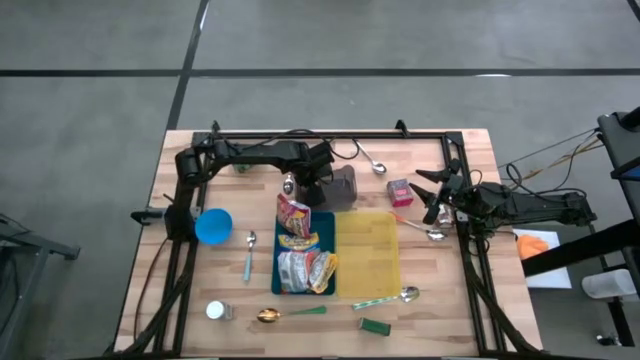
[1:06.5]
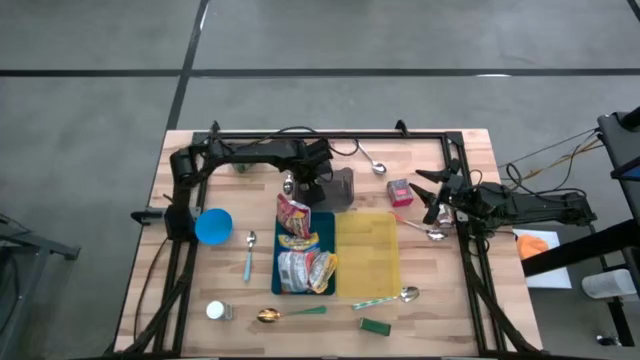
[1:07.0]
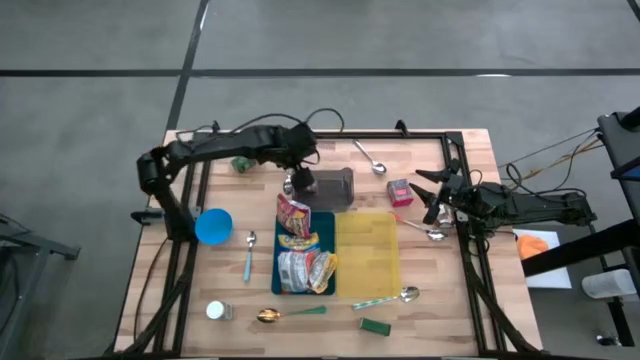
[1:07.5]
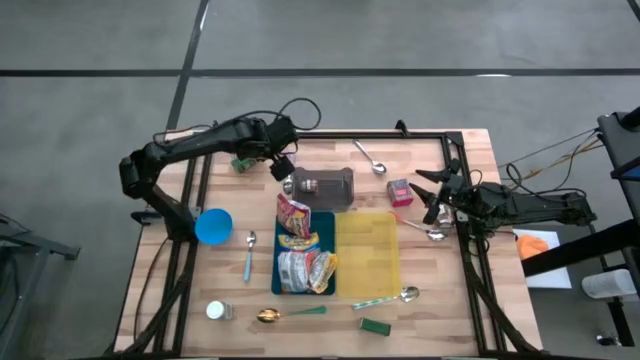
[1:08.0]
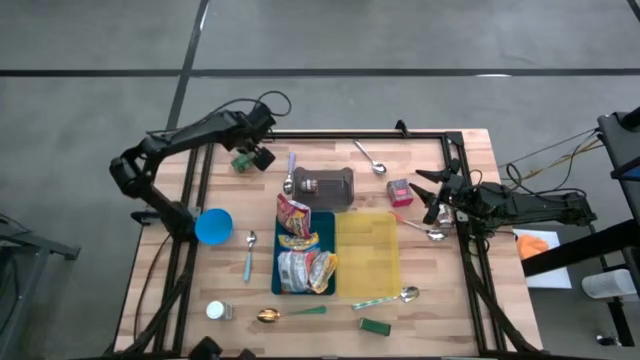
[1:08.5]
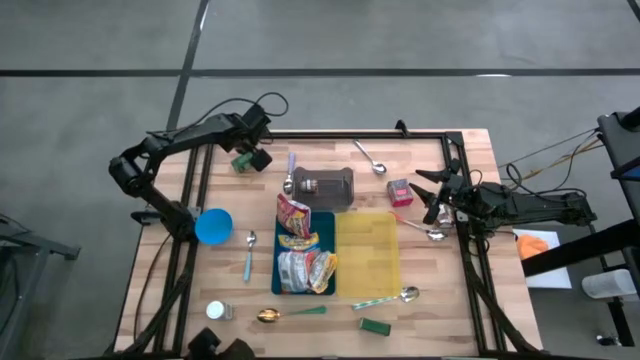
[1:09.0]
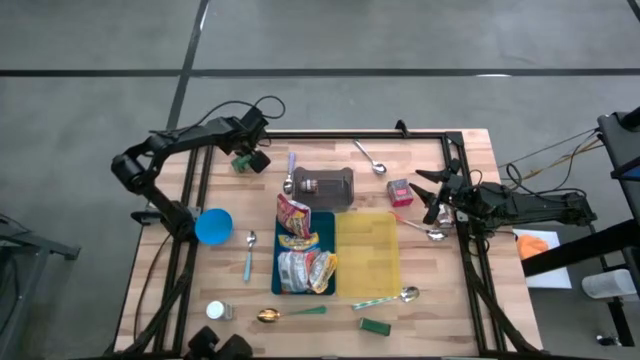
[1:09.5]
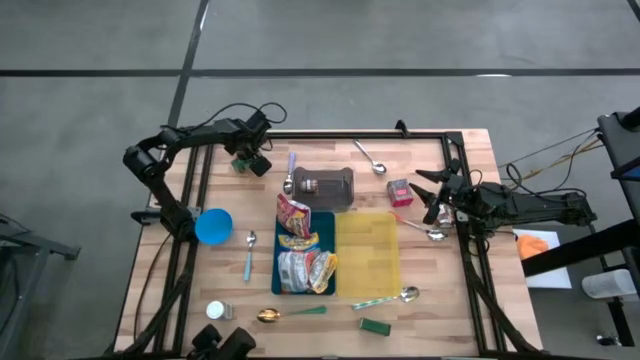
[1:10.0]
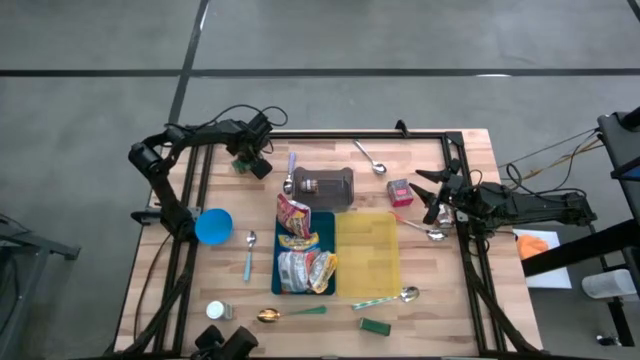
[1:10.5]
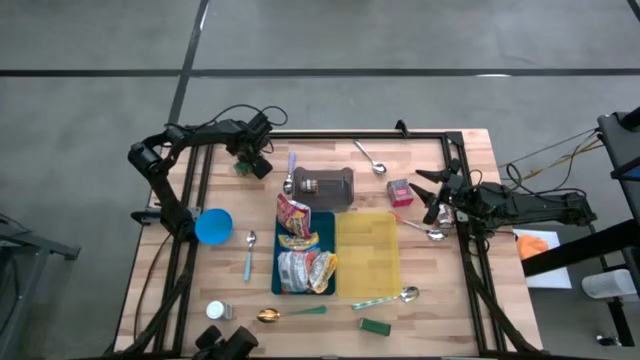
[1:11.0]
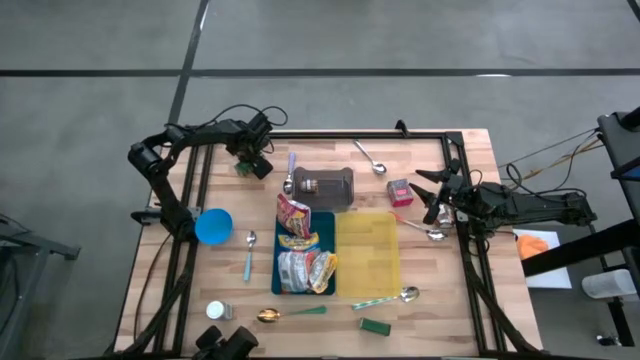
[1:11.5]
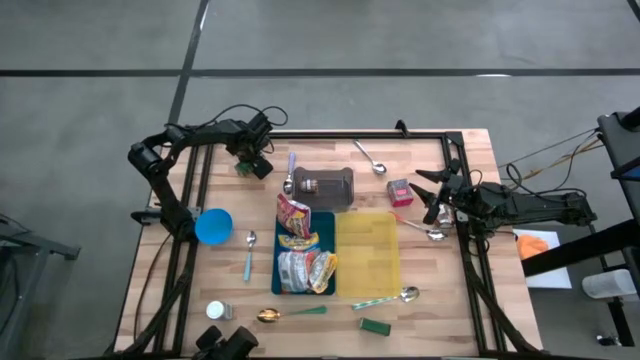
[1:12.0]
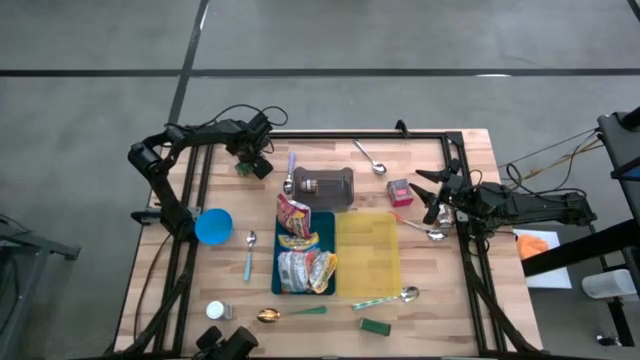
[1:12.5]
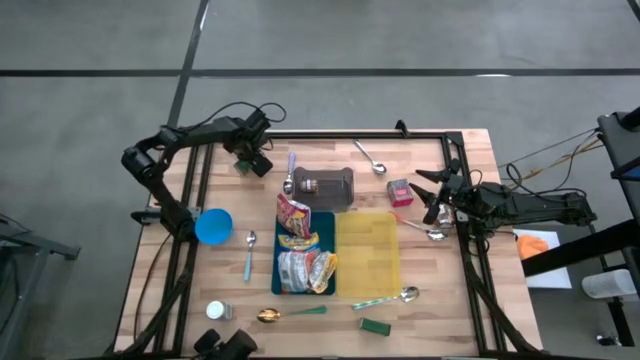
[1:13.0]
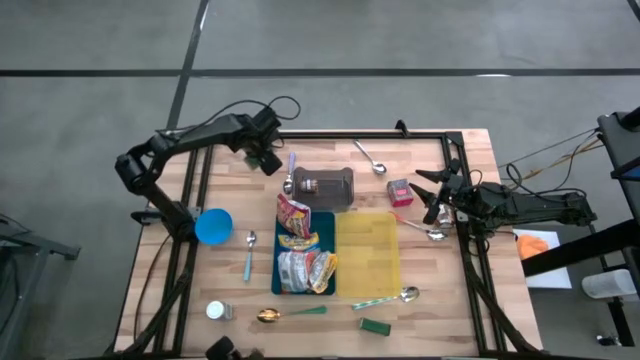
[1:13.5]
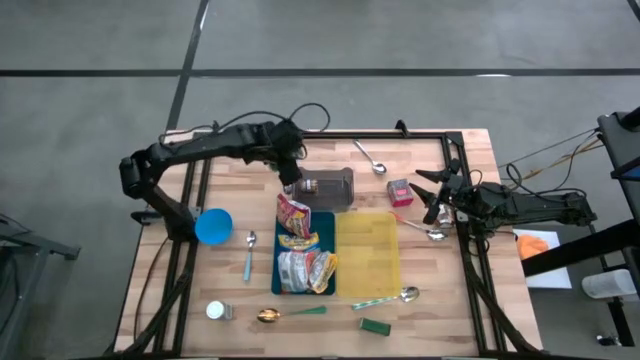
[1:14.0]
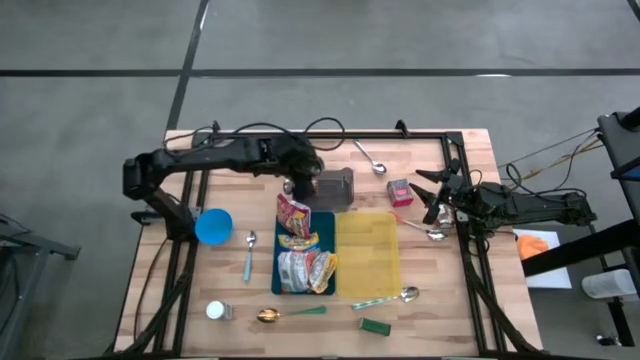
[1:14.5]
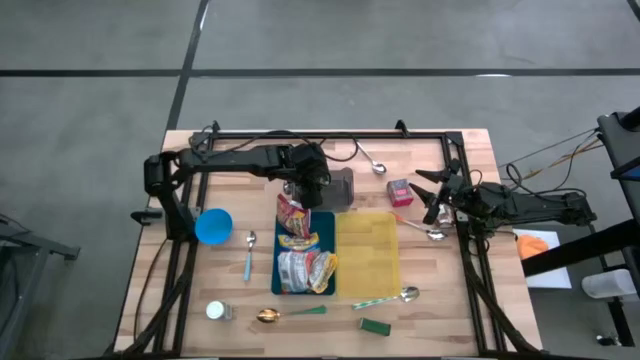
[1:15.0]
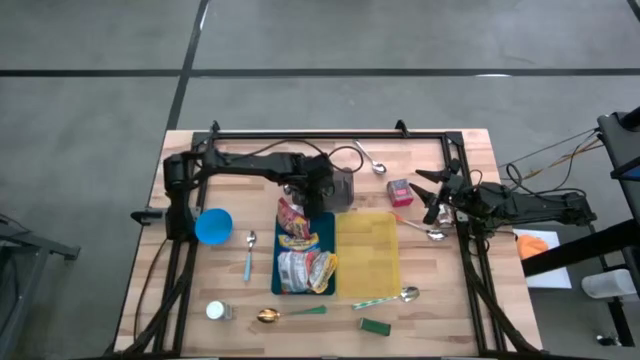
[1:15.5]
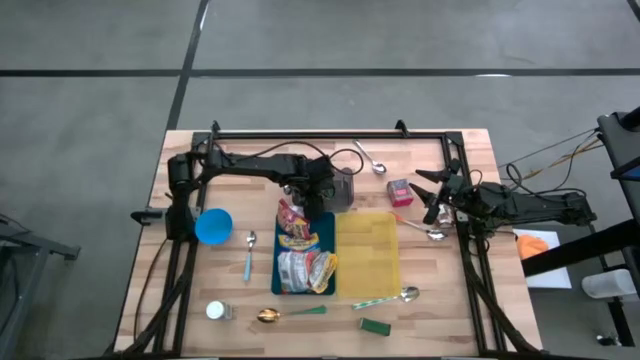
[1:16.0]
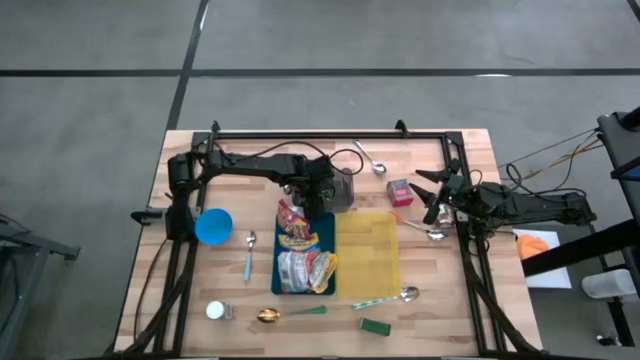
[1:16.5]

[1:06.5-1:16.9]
Put the green spice bottle into the black bin

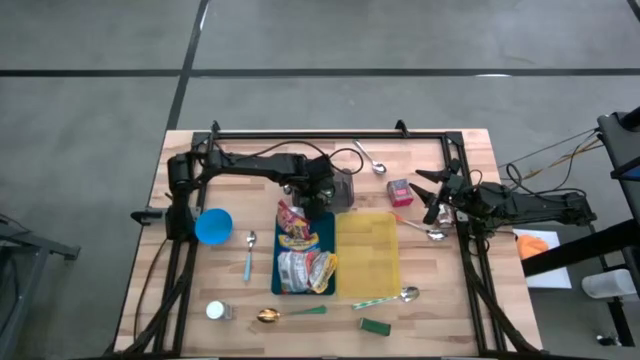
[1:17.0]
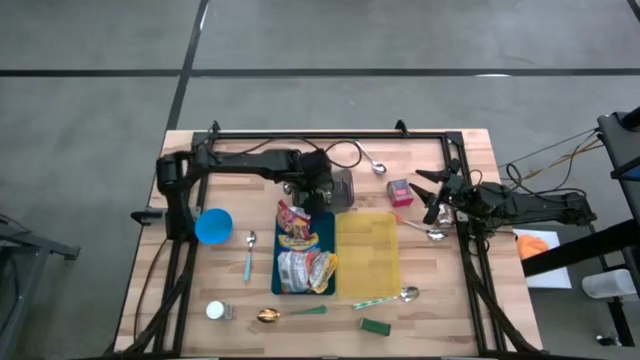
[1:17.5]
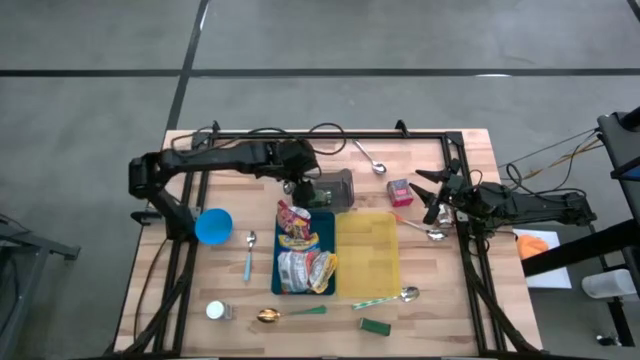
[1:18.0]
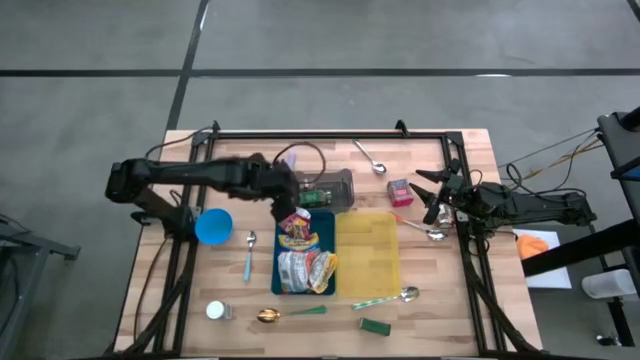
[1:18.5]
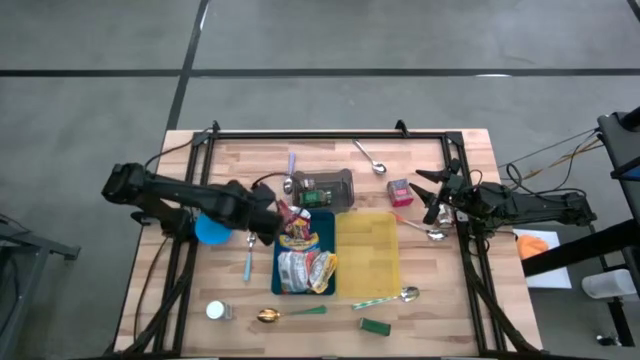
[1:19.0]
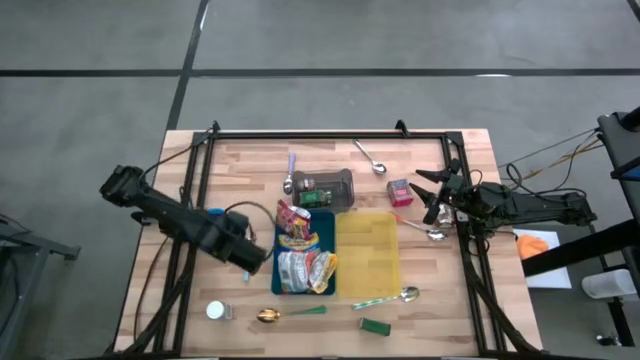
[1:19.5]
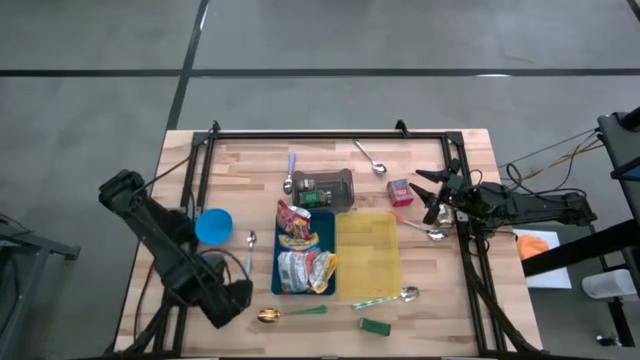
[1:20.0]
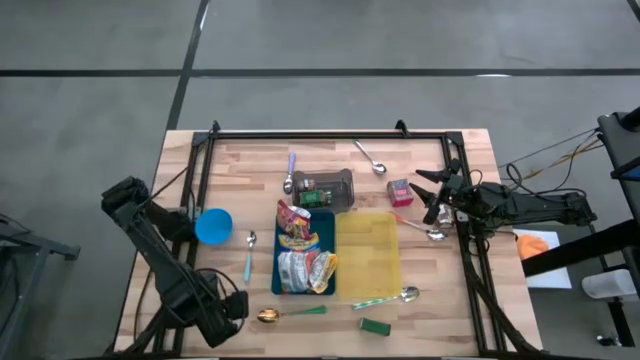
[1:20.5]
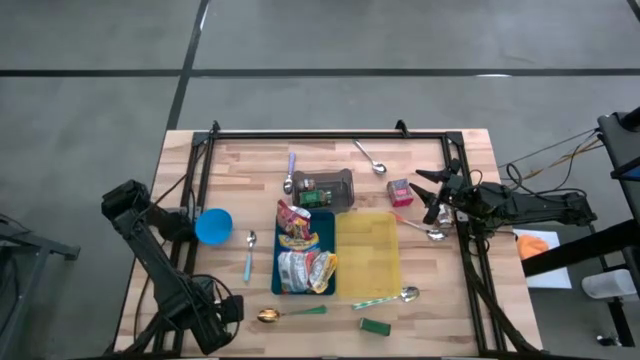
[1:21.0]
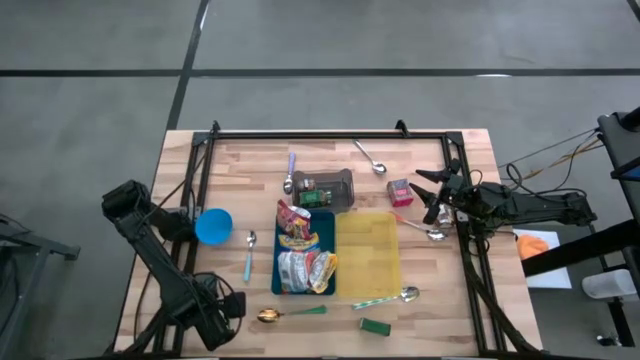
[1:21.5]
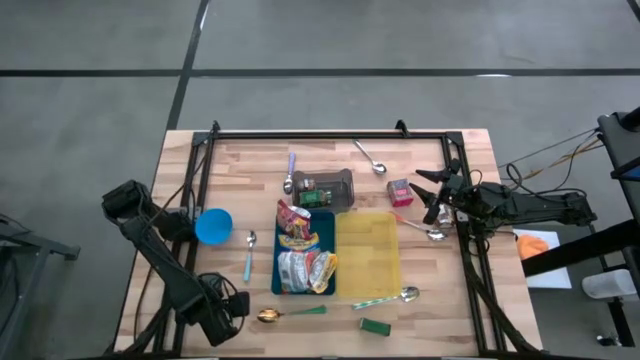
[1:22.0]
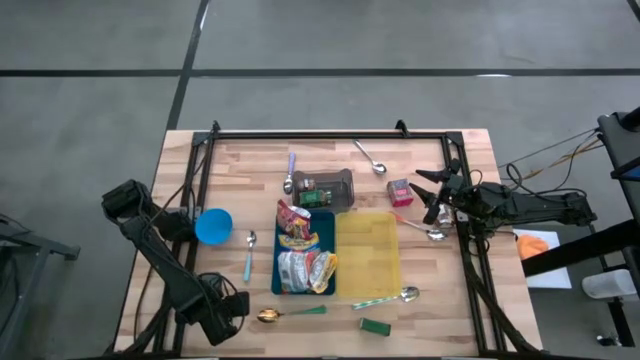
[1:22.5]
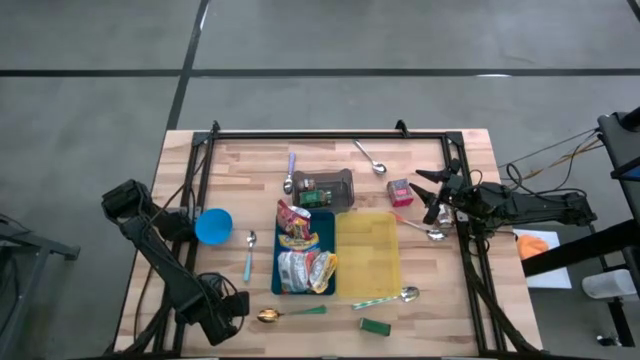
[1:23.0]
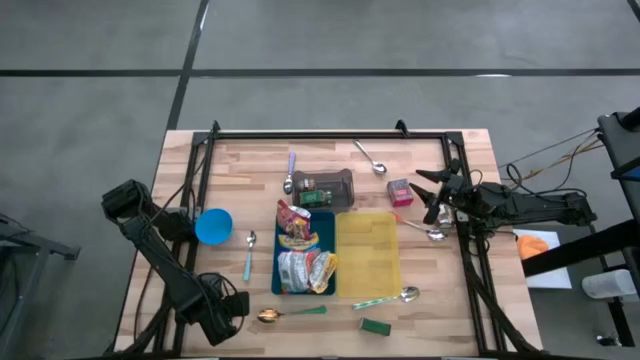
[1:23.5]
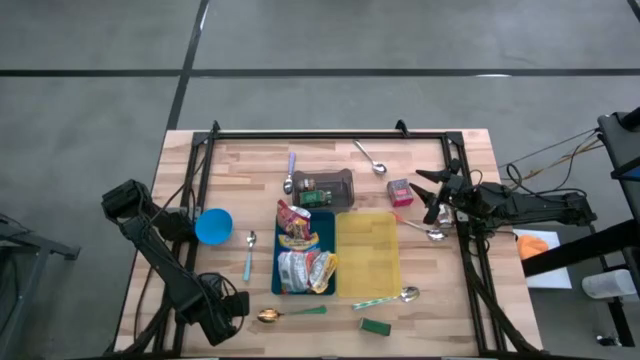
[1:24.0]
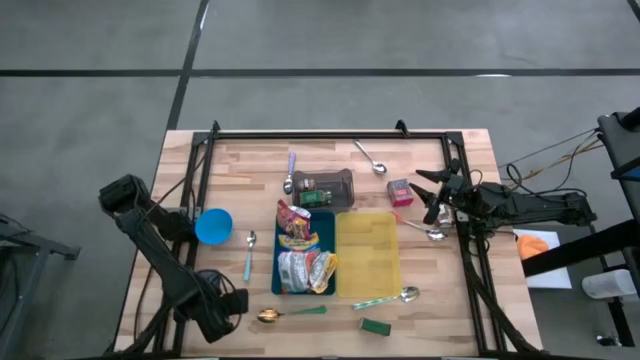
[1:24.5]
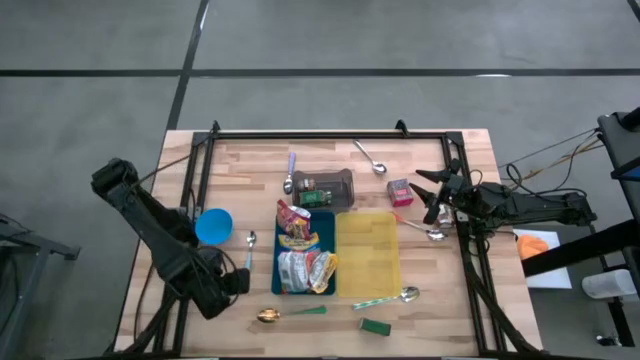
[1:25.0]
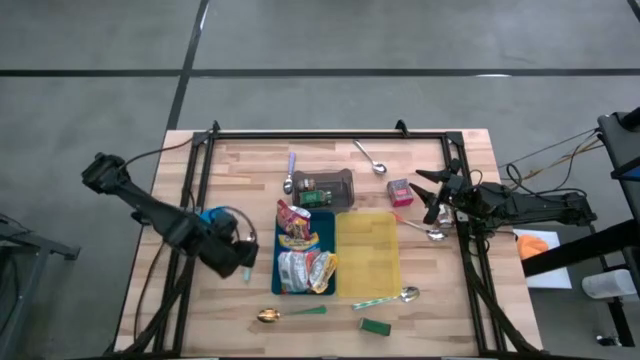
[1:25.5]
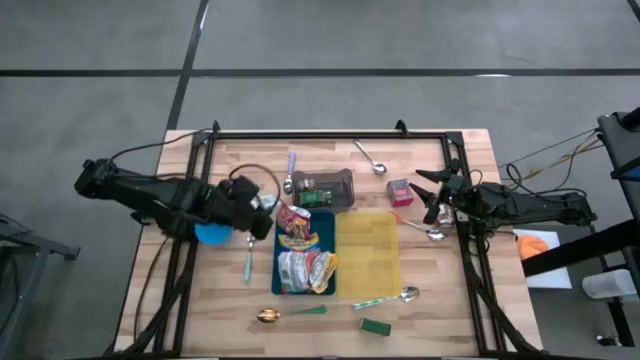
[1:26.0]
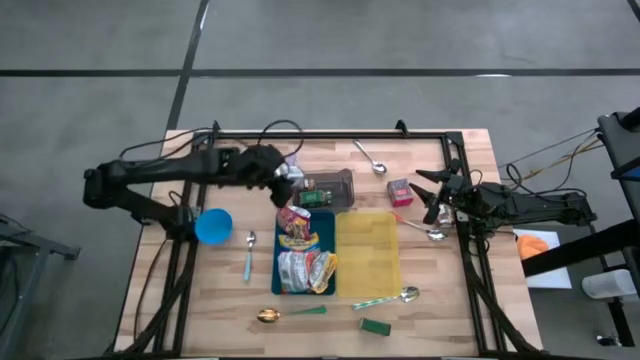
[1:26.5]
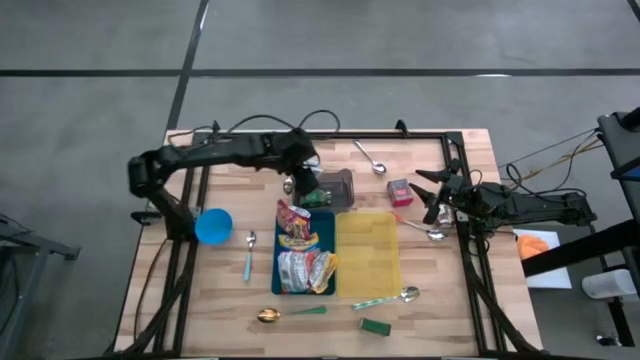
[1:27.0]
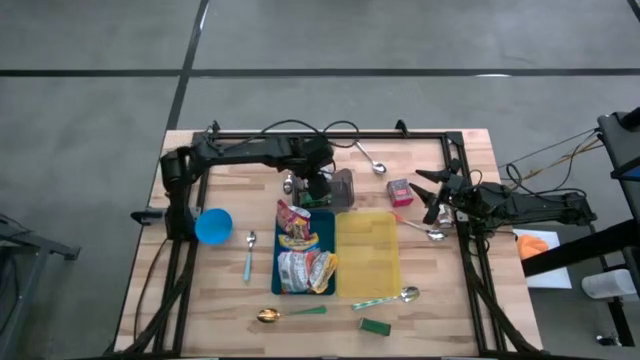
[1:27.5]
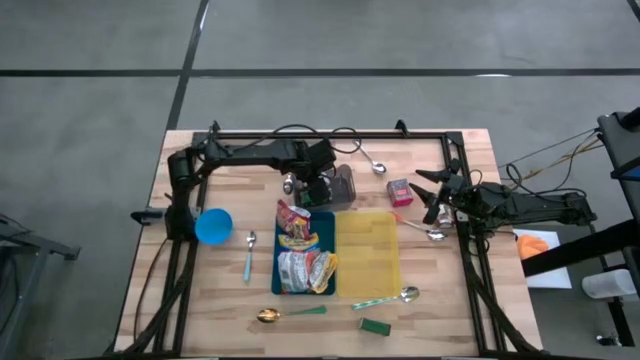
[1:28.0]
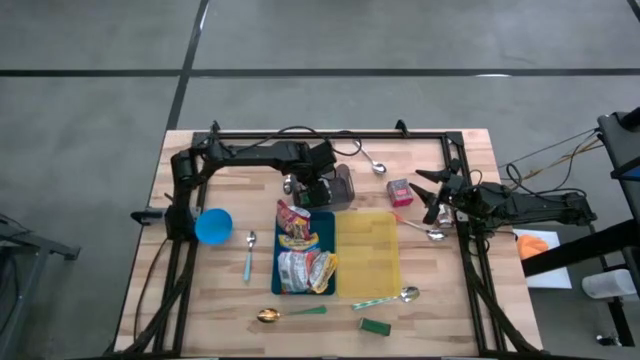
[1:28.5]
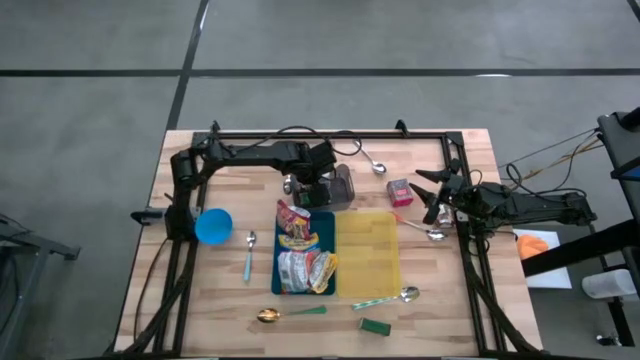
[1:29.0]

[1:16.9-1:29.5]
Put the white spice bottle into the black bin
